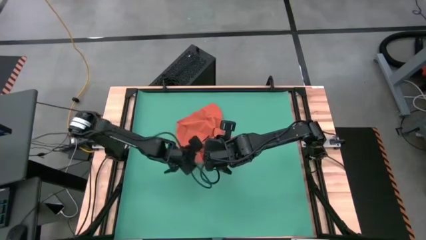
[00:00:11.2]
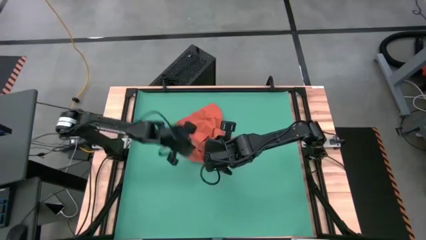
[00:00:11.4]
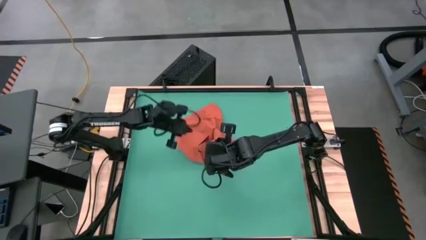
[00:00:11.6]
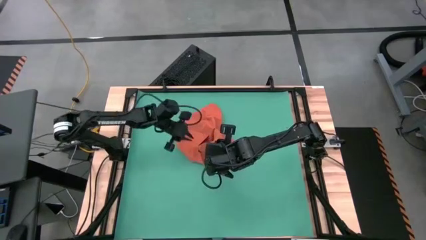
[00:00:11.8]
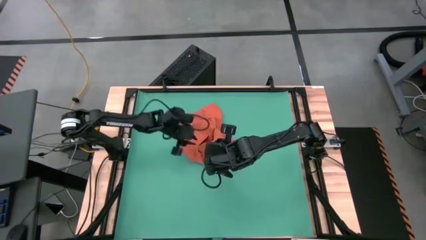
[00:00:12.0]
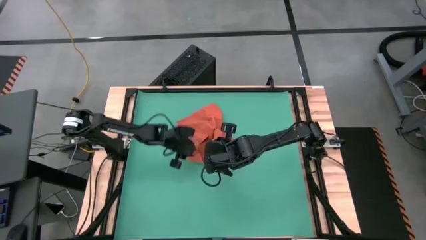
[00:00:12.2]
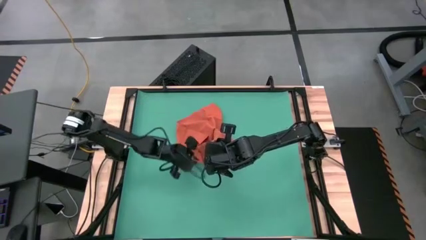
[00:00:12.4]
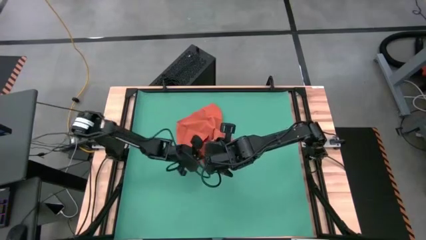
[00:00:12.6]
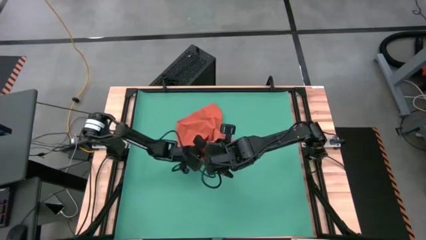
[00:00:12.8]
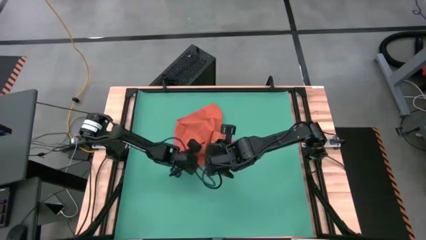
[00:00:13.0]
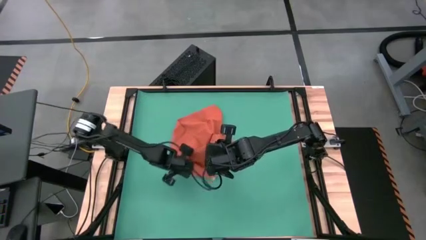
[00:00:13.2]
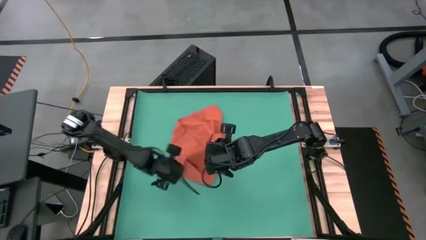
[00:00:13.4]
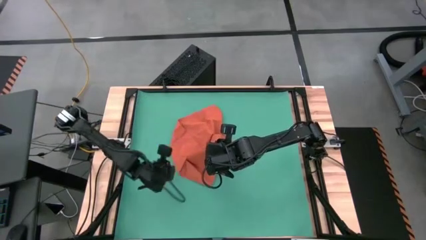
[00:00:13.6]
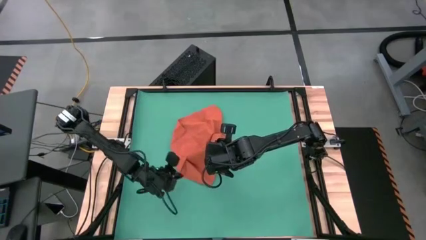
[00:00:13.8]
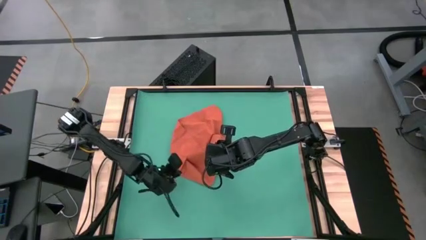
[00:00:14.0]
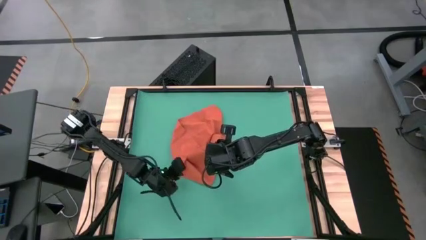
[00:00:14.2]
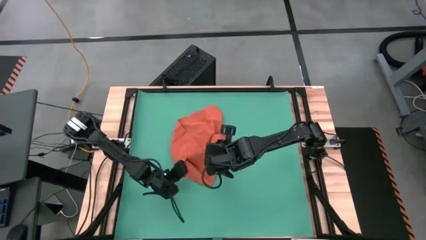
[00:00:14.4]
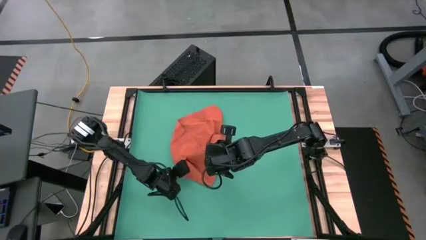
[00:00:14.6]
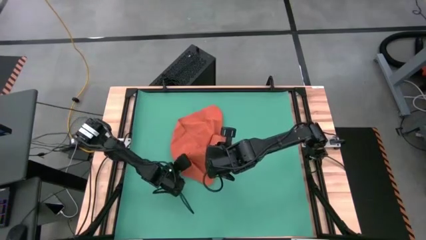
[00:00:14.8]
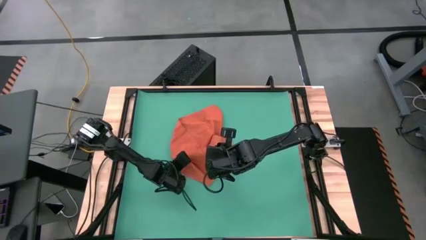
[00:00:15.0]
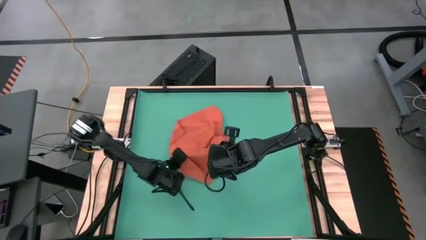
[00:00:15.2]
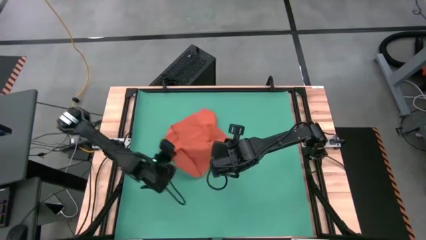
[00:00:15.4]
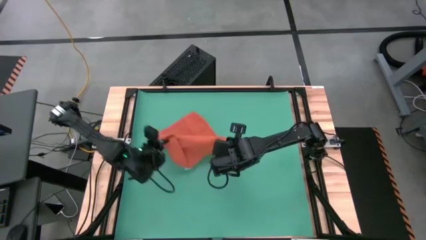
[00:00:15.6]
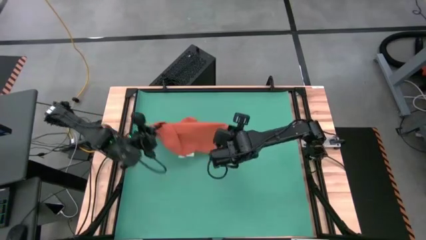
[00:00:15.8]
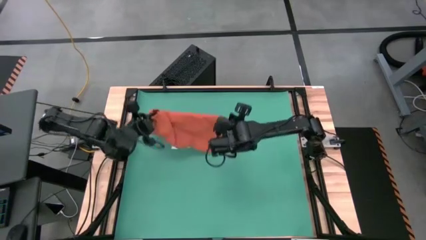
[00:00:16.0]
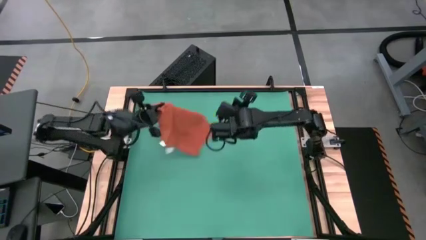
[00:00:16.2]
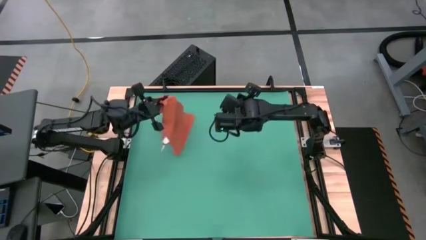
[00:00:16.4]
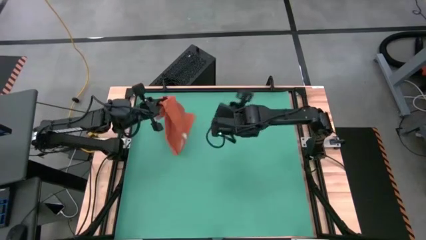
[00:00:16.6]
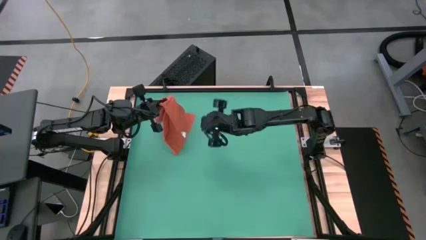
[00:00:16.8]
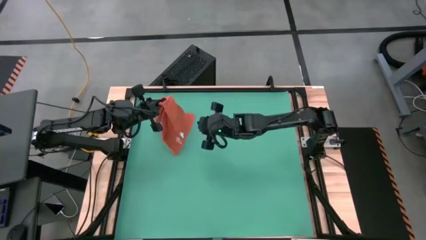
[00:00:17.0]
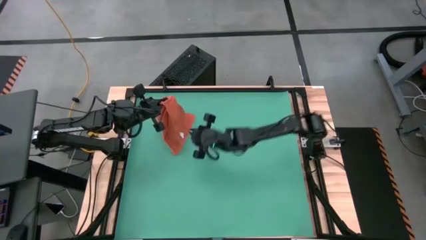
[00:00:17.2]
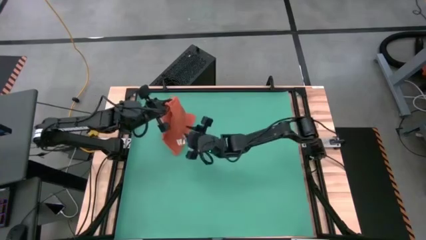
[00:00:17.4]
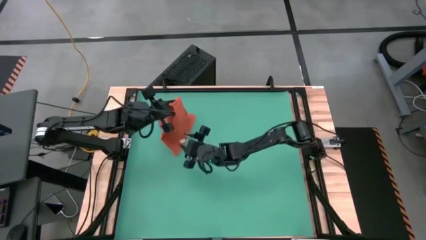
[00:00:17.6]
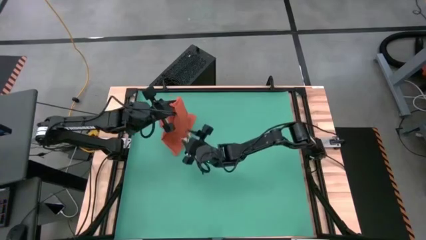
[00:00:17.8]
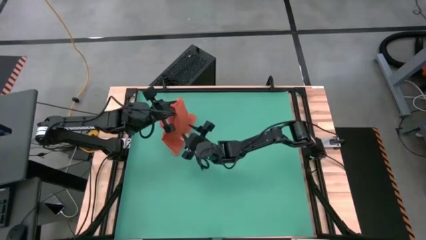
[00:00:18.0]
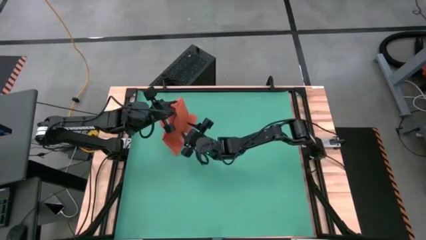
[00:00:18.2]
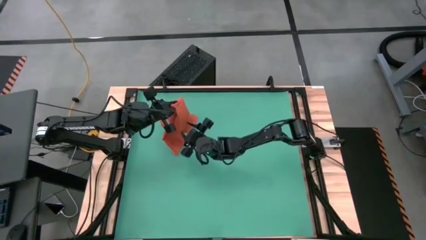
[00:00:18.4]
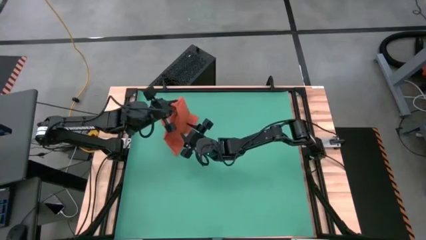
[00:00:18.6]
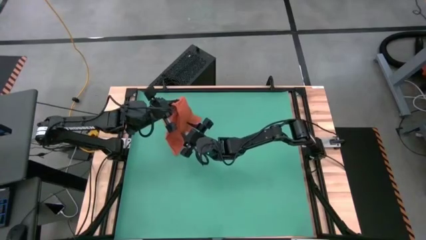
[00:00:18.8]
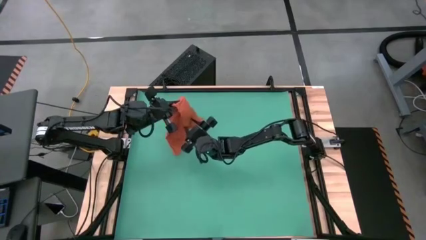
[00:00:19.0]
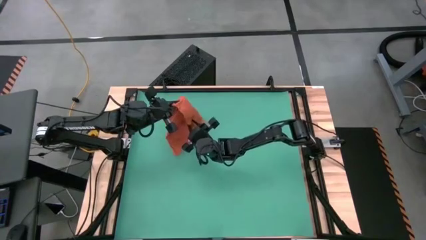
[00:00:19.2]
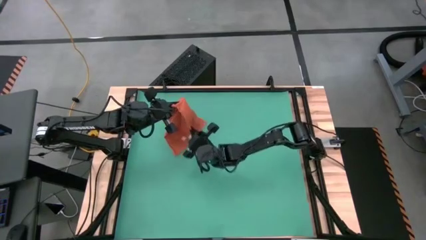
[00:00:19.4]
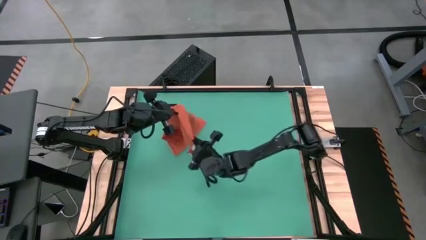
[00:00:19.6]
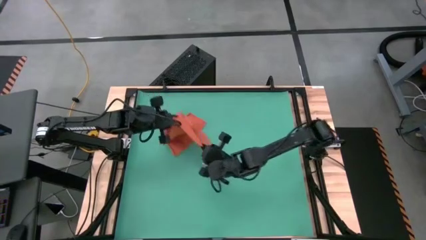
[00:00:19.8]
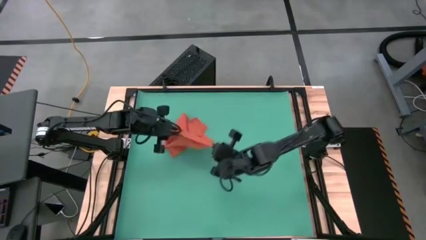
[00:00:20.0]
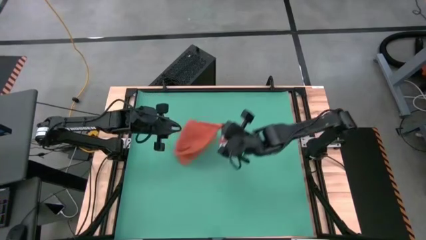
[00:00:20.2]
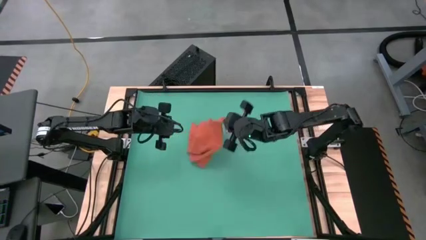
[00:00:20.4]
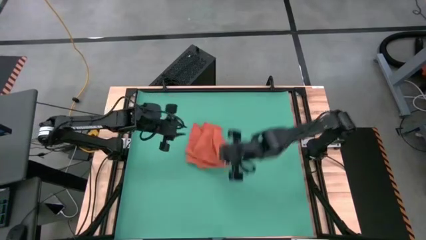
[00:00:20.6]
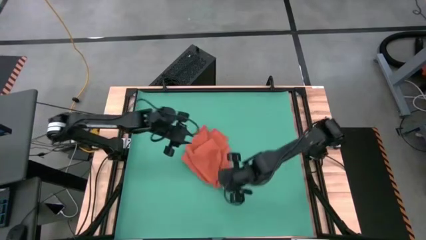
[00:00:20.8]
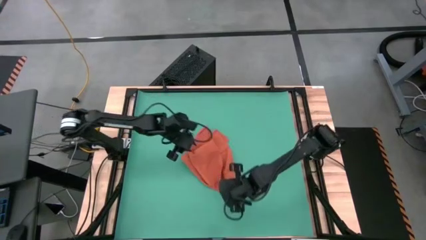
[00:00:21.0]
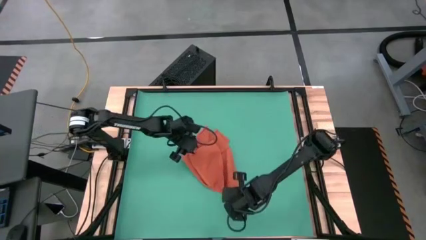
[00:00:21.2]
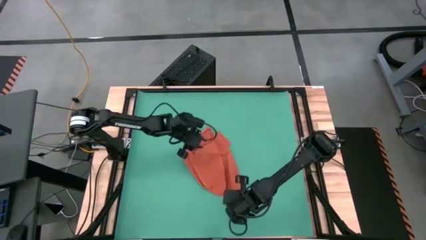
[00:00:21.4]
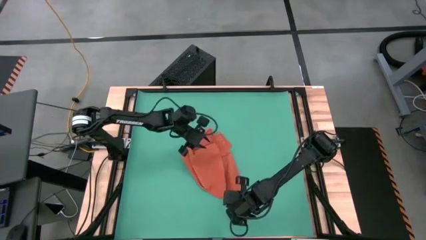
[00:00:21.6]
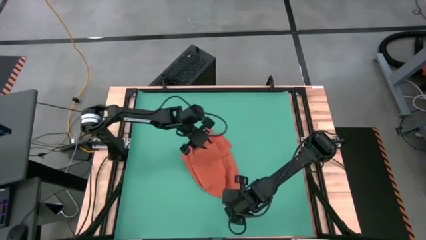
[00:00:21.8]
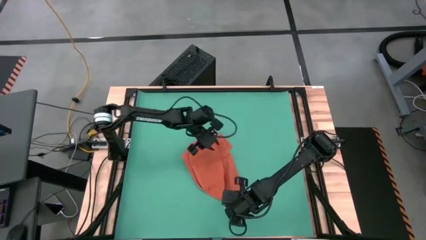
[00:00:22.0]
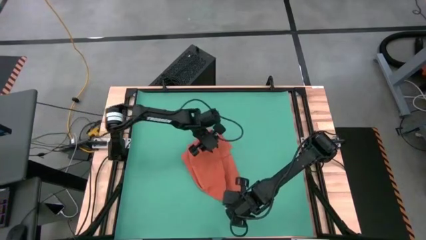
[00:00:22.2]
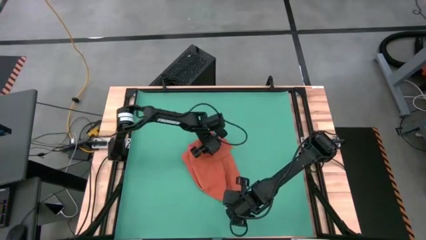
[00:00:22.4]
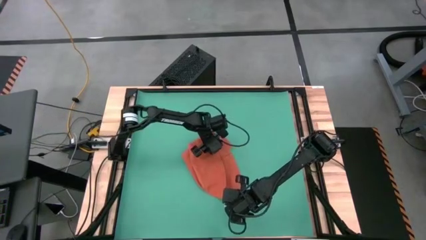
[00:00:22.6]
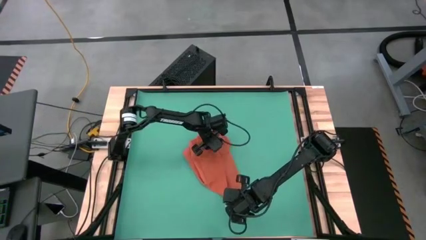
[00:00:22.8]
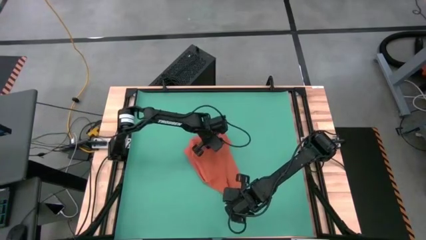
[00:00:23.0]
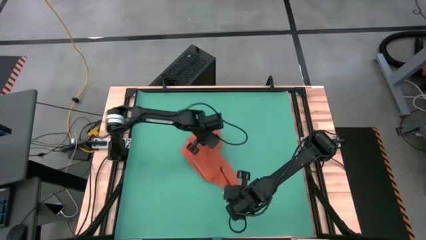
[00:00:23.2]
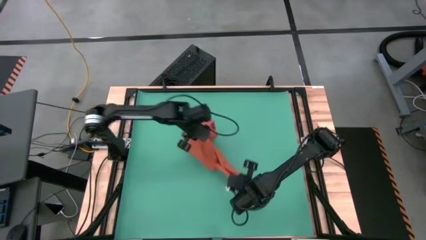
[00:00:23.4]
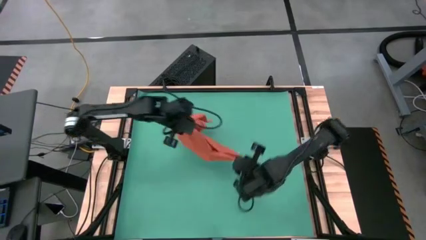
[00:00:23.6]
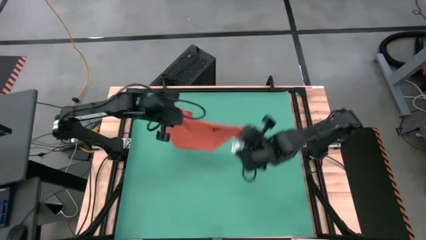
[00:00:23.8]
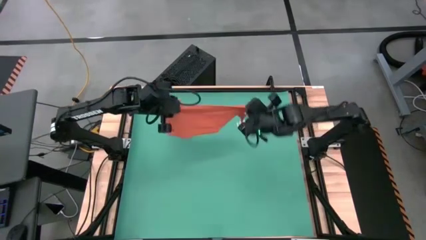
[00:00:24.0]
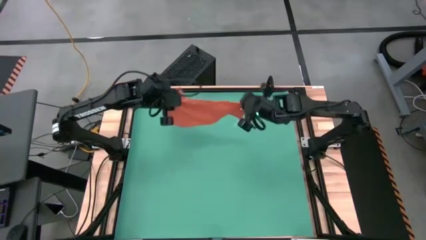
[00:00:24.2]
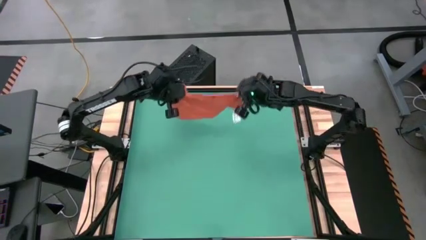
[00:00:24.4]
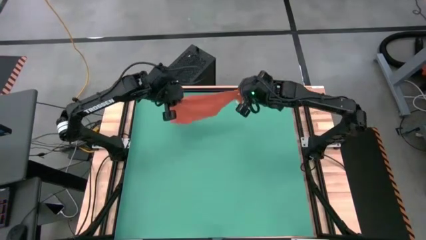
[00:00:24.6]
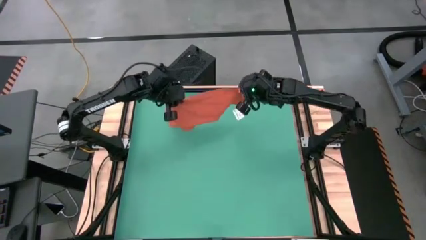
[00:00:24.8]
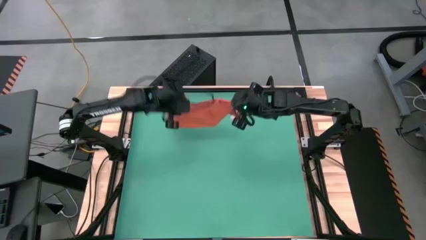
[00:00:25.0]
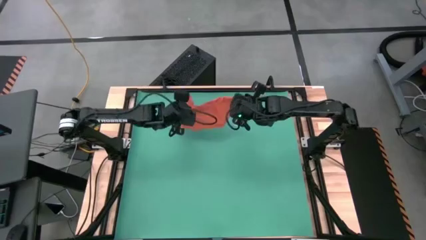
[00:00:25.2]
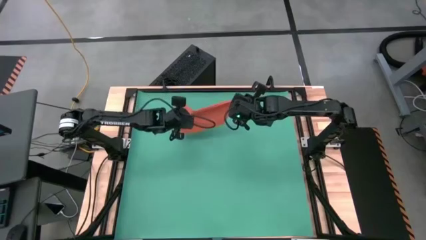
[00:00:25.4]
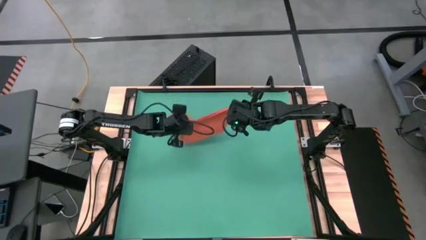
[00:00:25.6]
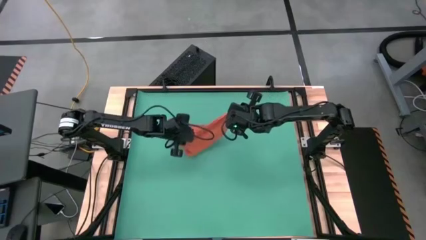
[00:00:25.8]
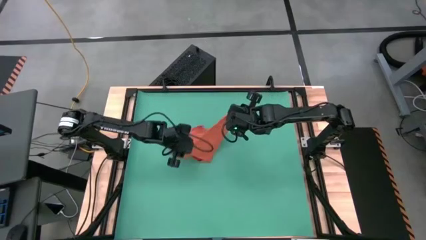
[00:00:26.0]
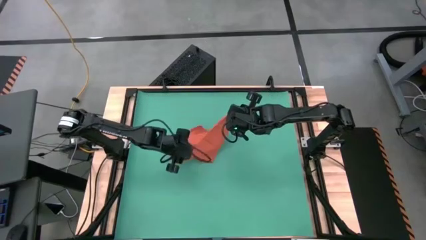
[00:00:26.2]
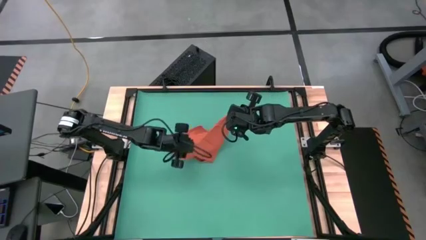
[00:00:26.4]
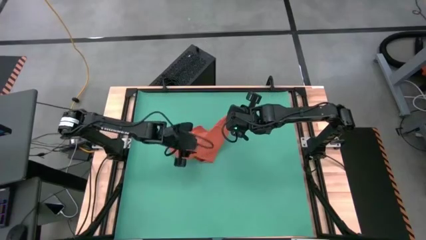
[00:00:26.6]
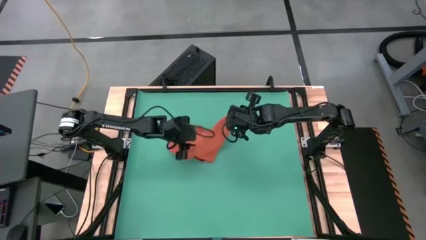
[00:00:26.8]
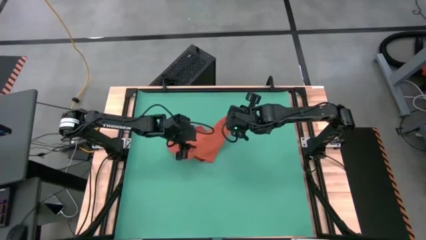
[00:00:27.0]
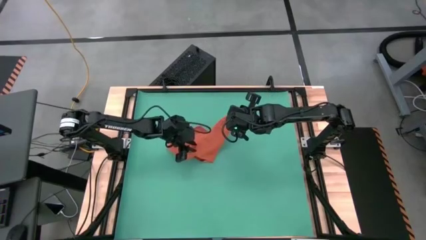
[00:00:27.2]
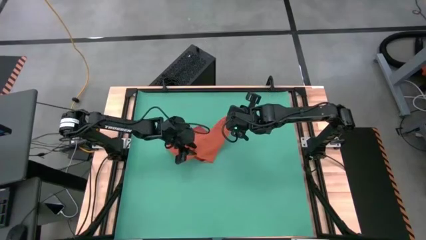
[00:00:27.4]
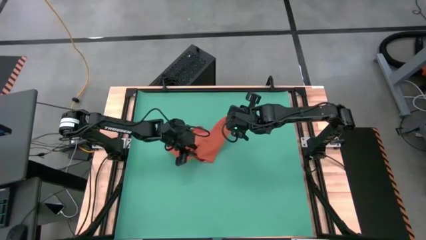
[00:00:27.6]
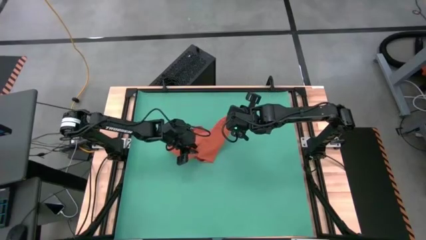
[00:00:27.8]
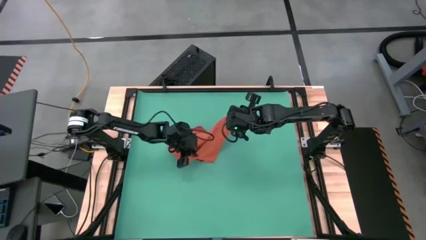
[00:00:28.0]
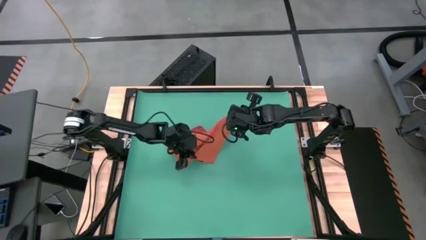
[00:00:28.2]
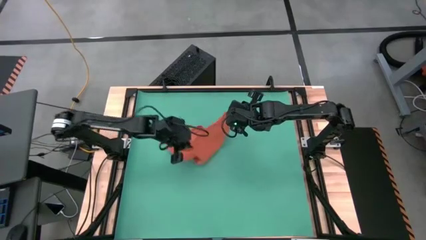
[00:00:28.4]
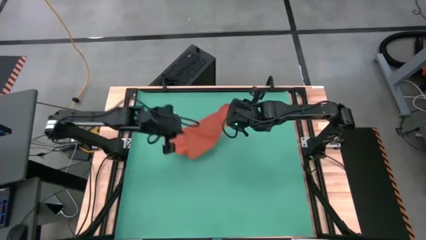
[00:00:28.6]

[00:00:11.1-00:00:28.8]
Task: Roll towel into tight, uniform cylinder
Fold the orange table napkin
